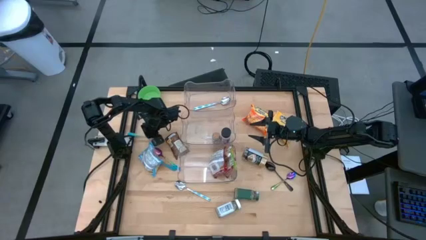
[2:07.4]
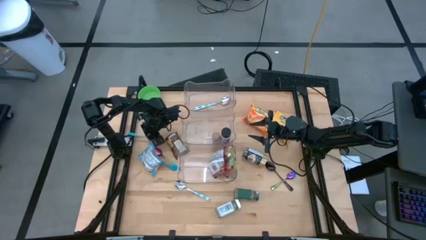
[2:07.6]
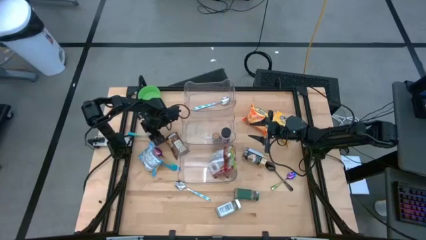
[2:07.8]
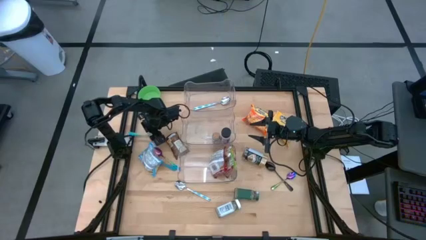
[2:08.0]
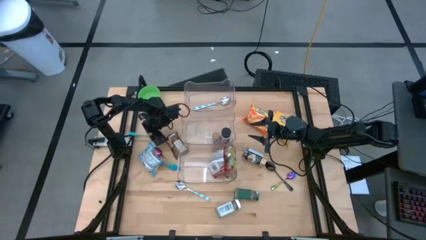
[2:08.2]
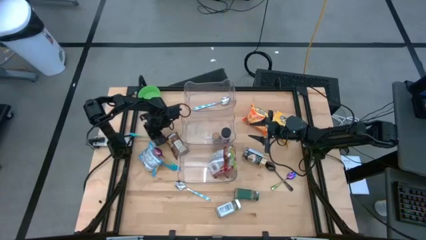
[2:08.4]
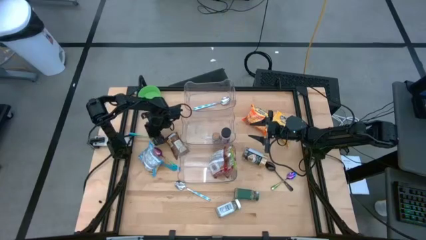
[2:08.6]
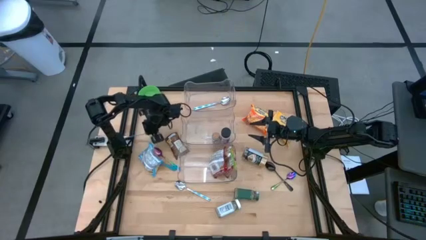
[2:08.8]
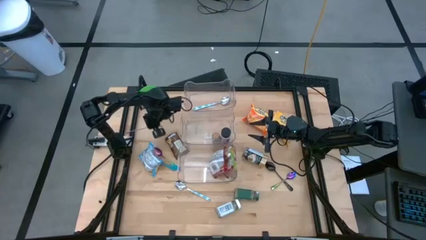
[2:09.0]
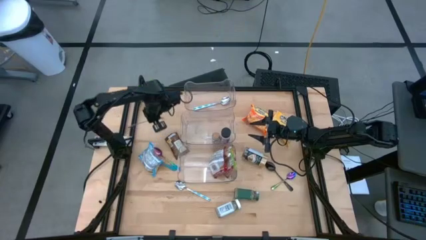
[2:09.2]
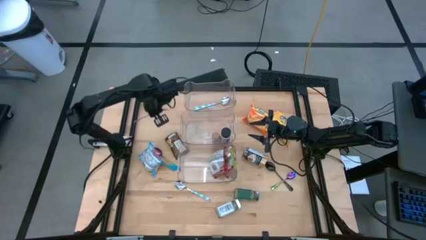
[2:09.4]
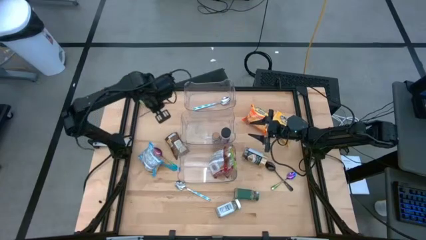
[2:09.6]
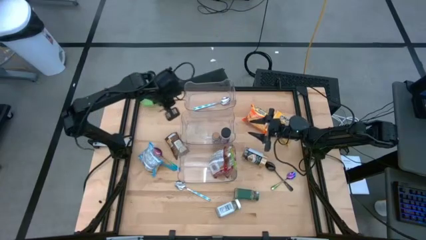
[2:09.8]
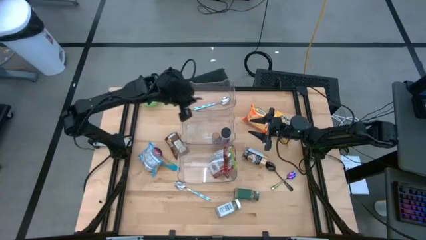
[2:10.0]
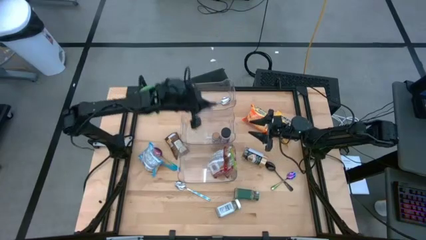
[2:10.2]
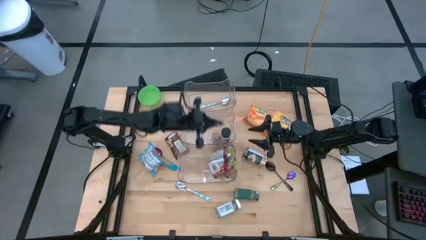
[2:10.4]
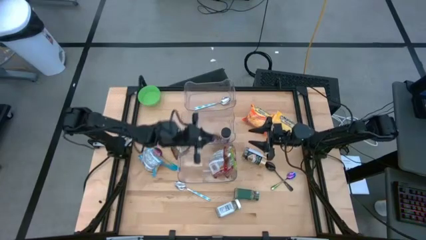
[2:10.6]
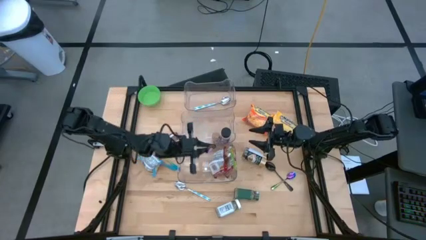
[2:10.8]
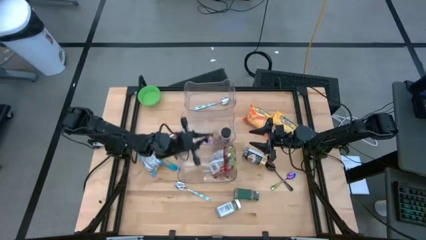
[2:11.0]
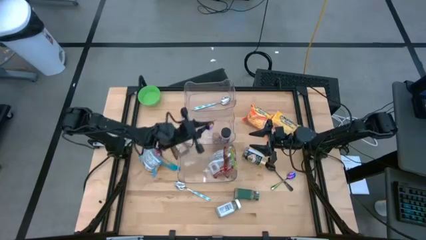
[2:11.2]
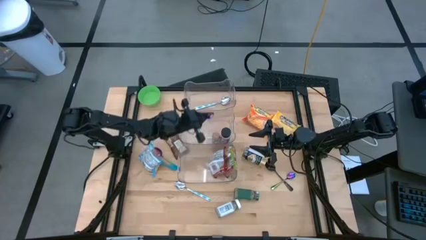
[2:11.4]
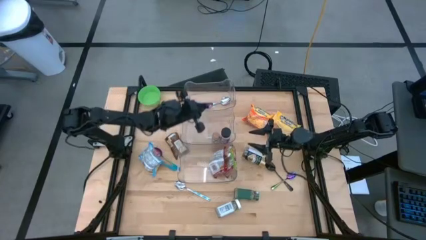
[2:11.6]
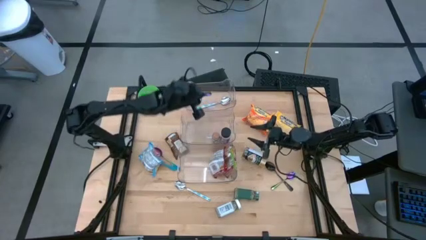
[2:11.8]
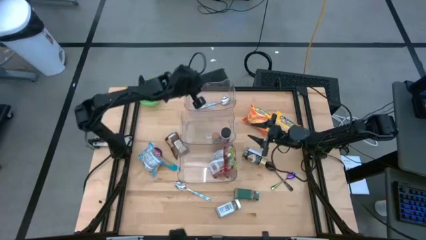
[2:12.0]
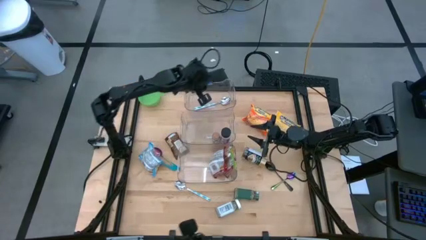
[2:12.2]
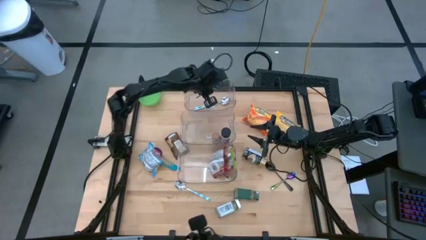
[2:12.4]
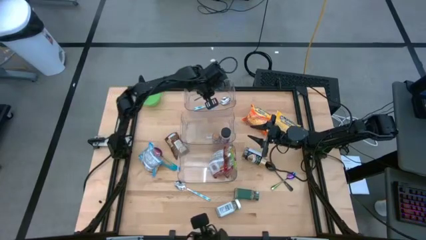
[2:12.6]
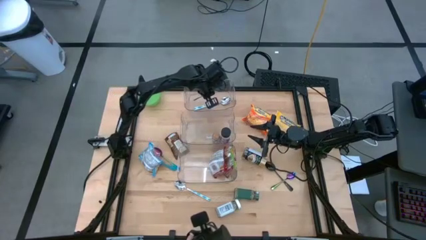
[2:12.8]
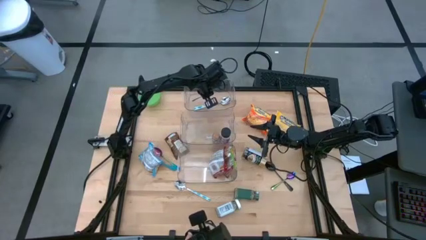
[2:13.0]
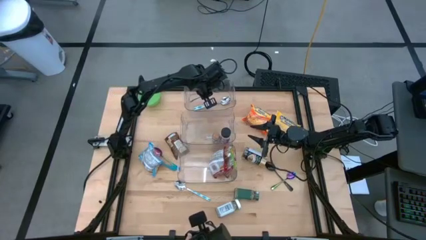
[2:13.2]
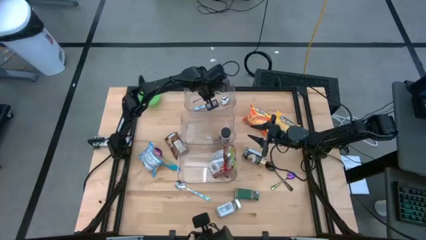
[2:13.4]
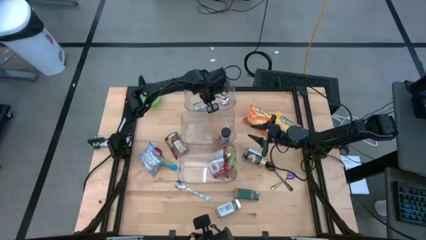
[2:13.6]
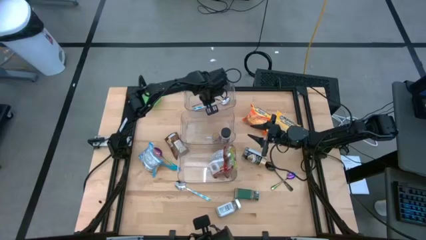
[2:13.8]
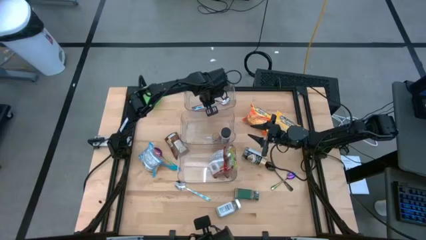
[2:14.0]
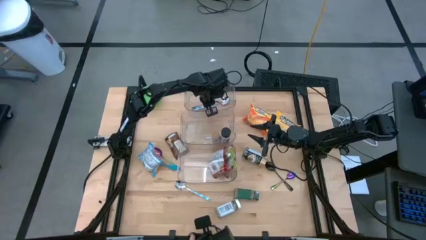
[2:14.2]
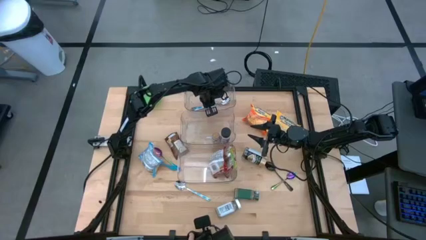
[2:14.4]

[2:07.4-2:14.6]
Task: Pick & Place Food Item
Put the top blue spoon into the top transparent bin

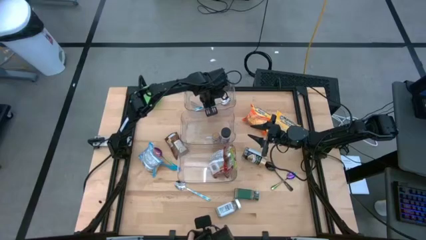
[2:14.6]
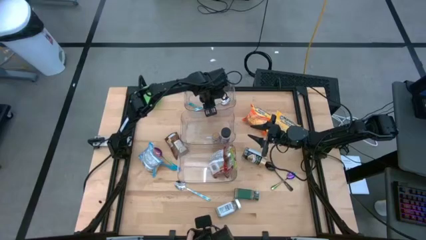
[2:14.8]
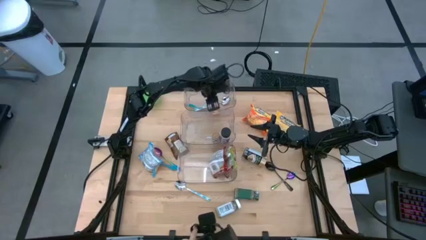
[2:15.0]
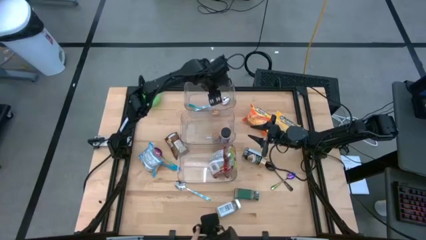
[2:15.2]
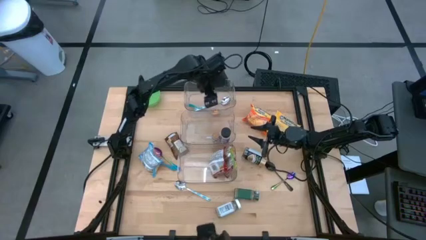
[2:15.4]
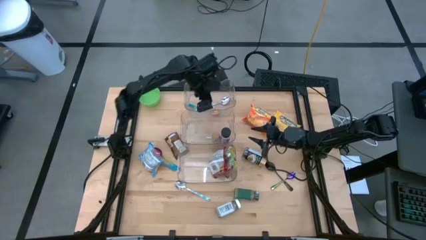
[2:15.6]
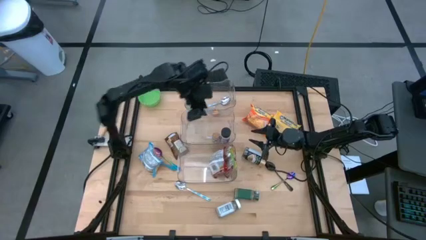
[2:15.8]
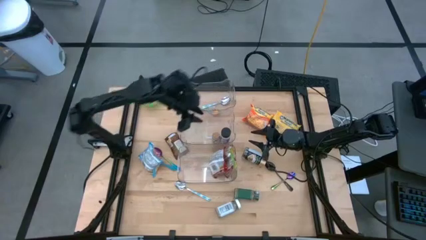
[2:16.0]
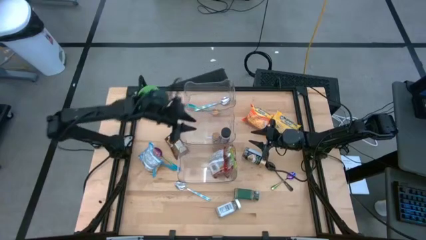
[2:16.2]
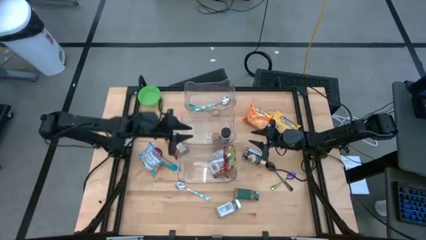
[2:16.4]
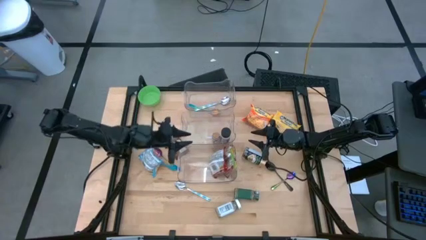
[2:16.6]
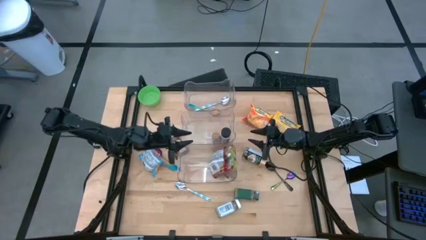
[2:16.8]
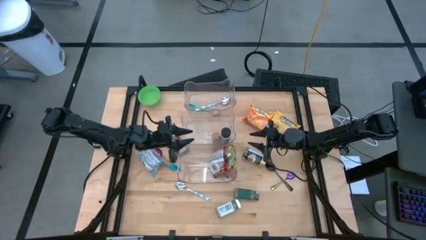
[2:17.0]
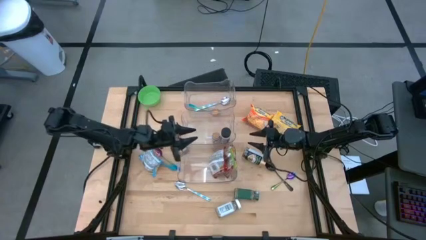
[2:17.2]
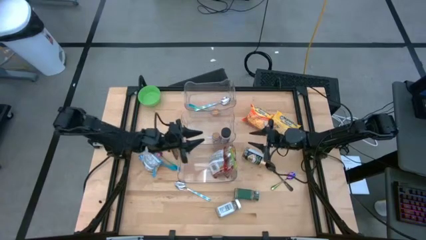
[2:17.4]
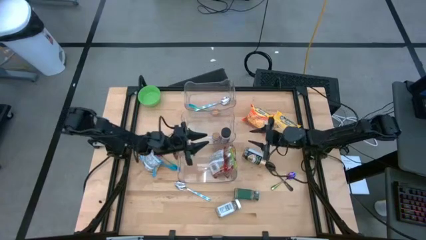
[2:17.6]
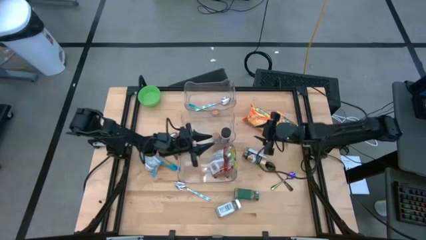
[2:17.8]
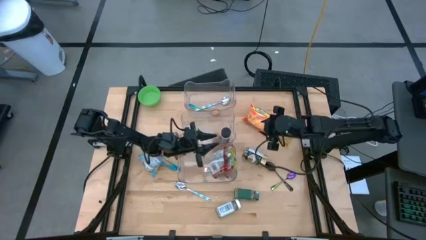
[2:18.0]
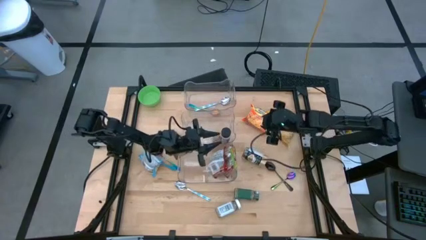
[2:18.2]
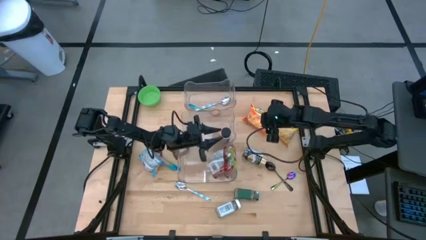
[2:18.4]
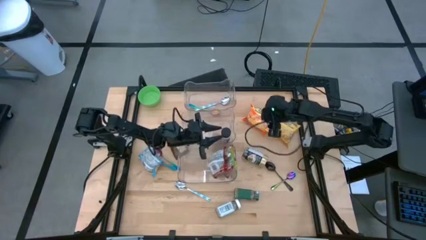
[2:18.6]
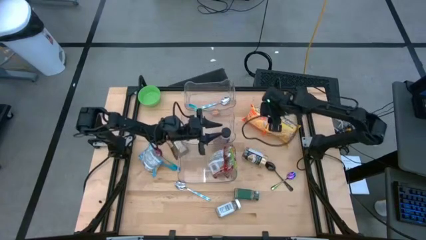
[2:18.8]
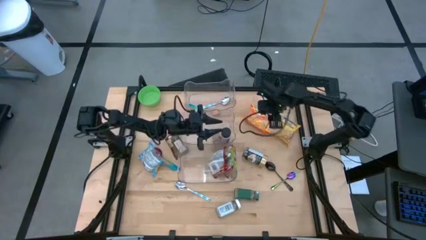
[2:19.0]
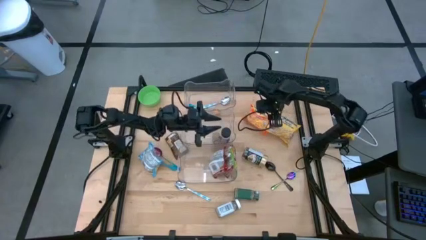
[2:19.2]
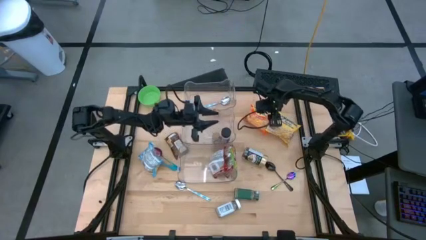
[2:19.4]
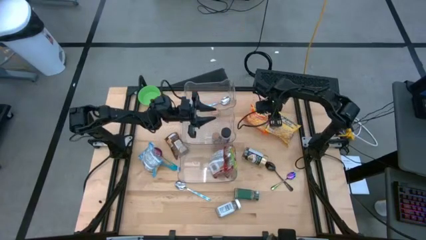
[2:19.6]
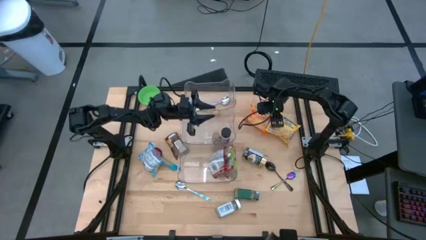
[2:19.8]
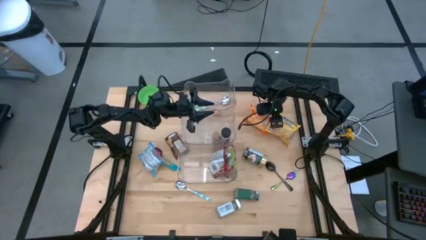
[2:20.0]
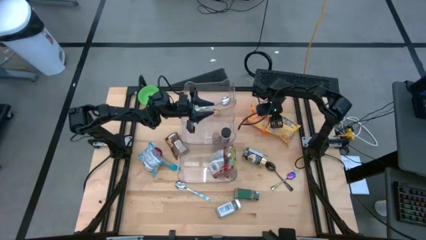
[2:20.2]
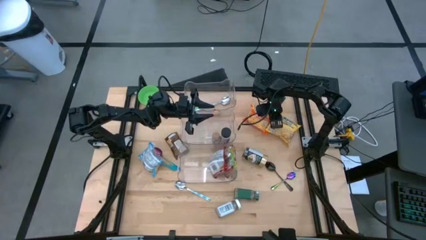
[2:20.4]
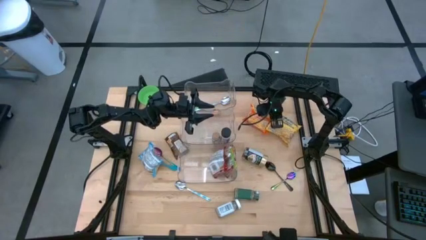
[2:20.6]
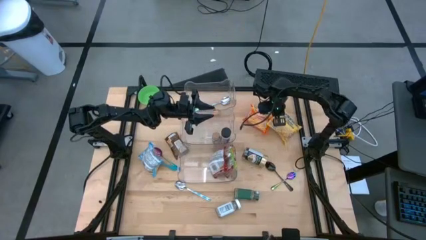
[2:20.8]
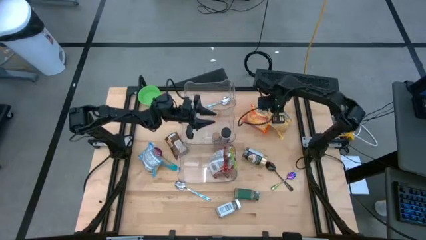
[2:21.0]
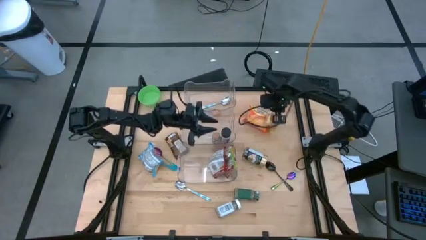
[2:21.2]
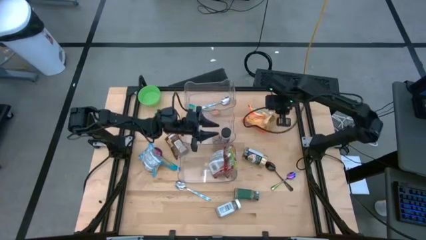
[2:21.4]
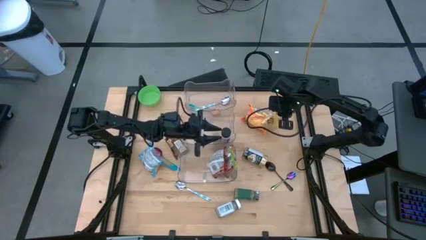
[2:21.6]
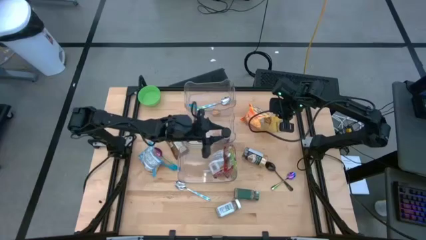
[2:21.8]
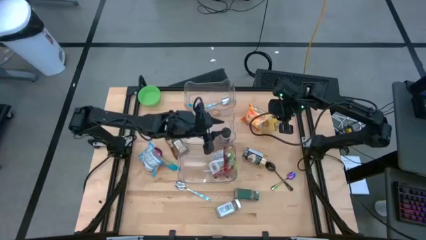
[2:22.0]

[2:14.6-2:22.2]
Put the yellow noodle pack into the bottom transparent bin

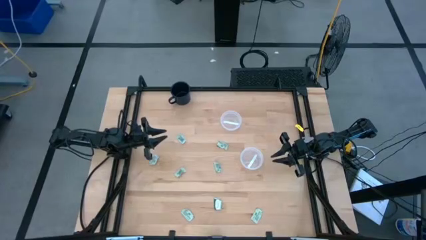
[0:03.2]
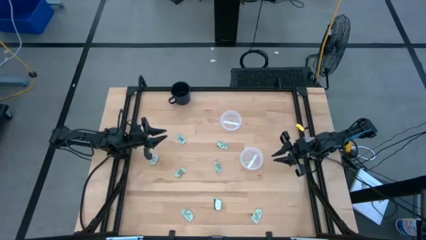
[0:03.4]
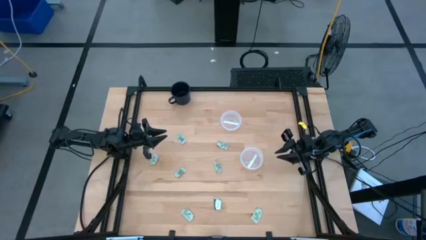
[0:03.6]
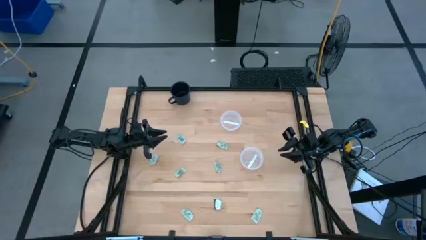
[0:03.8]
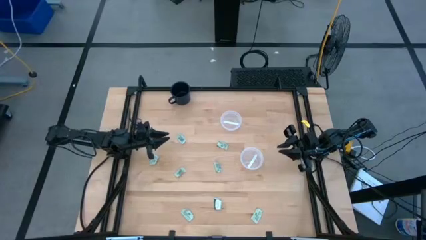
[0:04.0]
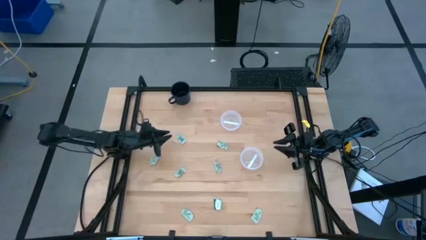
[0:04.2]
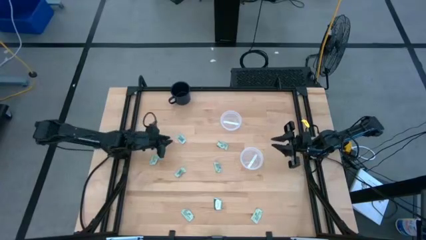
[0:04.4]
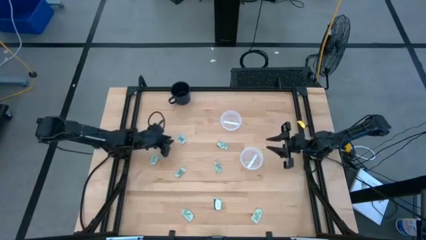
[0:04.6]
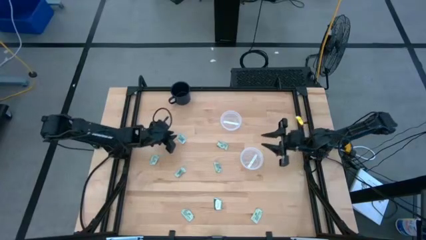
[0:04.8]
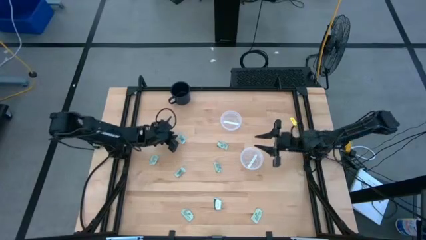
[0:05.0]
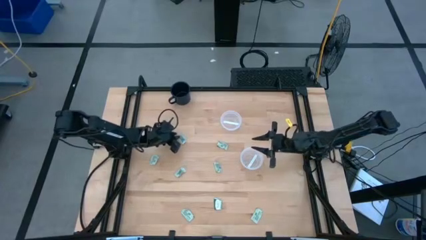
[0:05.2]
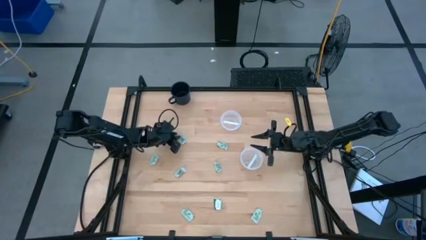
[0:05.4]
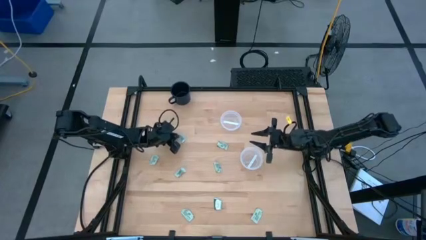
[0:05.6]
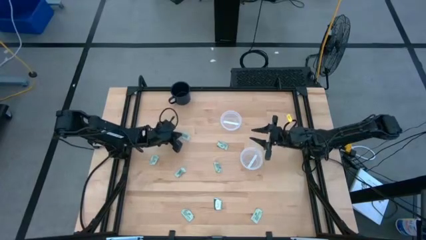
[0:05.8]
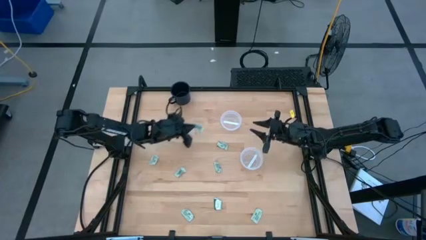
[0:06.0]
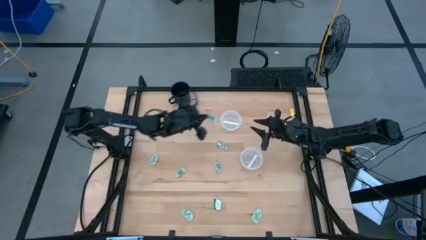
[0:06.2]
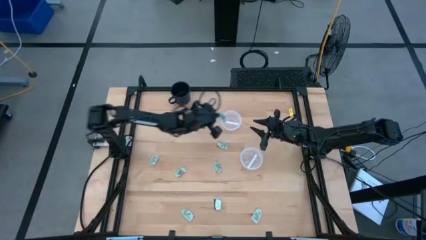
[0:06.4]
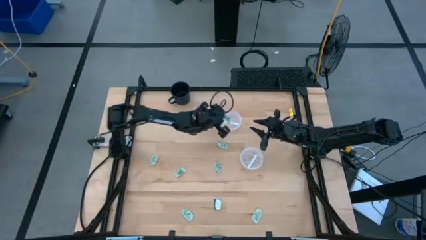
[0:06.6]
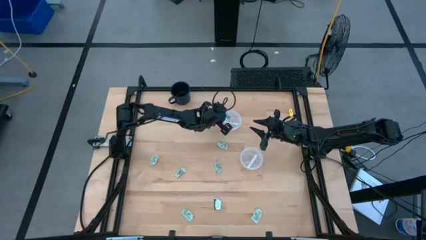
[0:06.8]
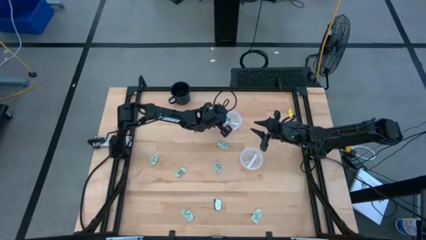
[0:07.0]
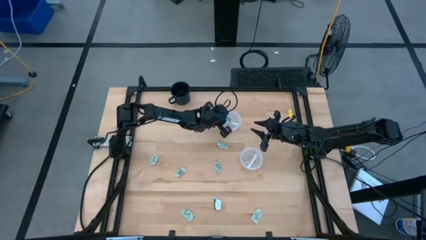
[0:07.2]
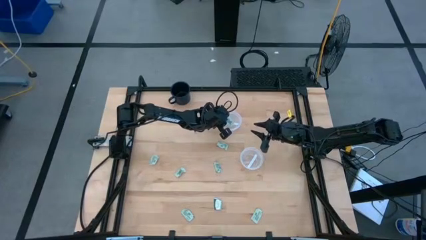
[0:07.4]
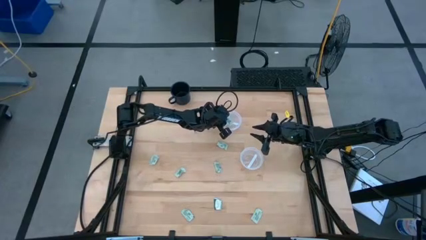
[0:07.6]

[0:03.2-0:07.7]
Task: Pick and place items into bin
Put the stevia packet into the top transparent bin
